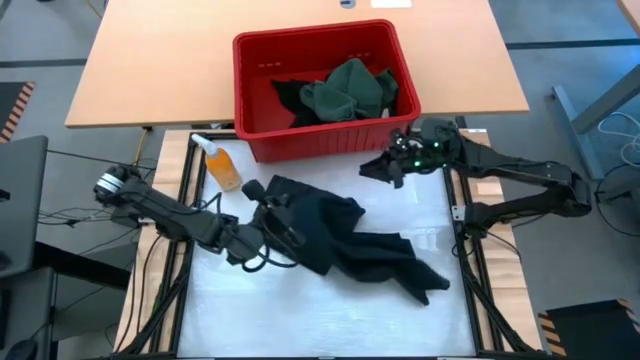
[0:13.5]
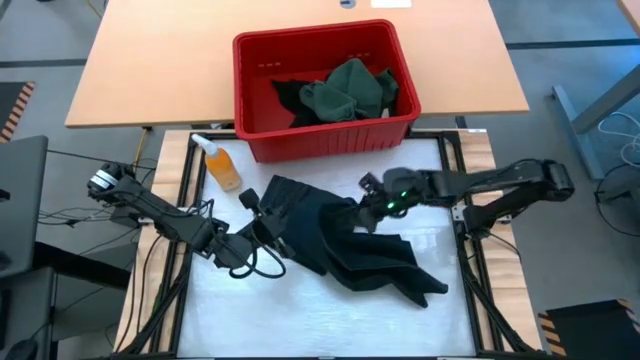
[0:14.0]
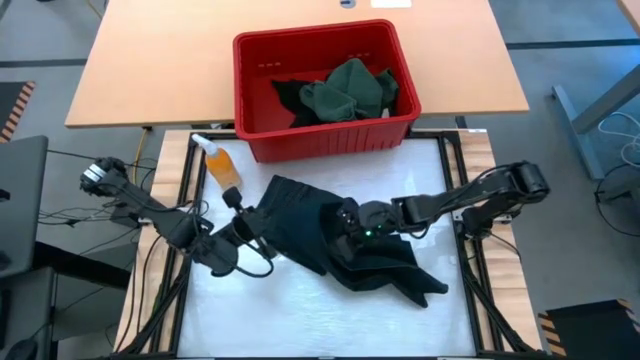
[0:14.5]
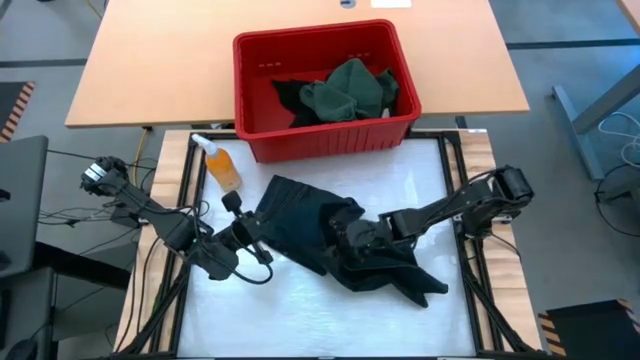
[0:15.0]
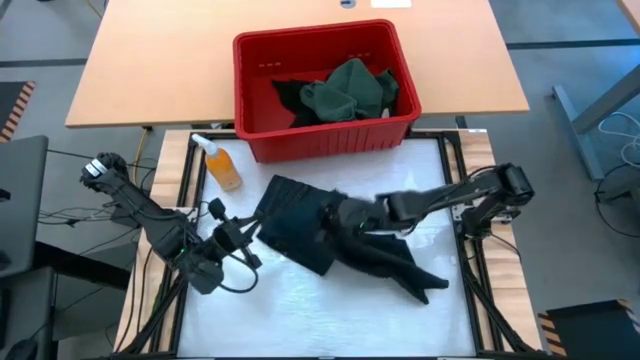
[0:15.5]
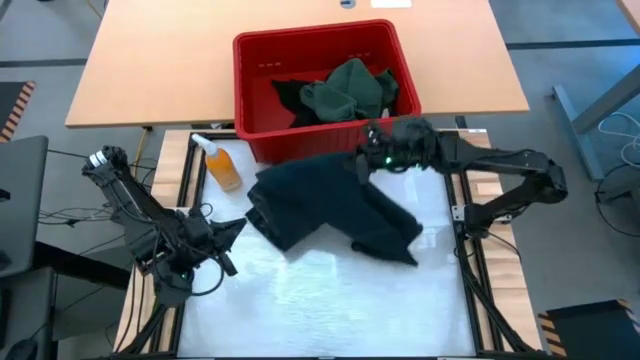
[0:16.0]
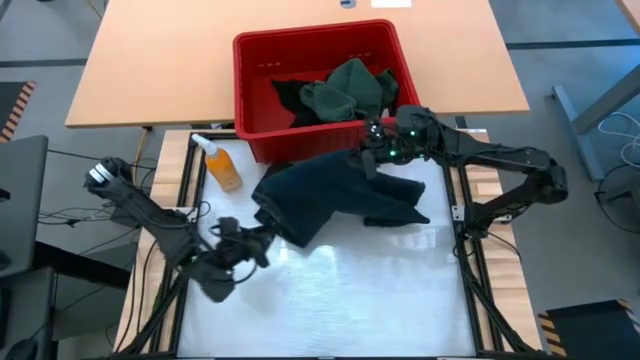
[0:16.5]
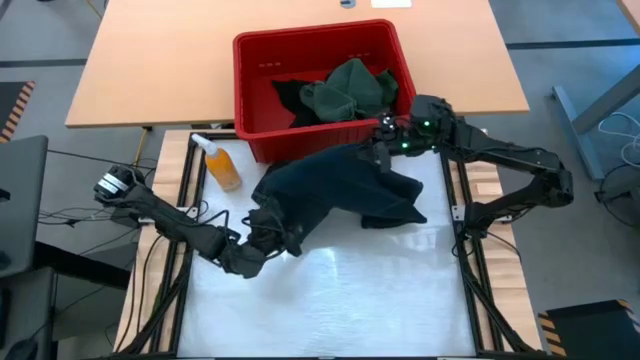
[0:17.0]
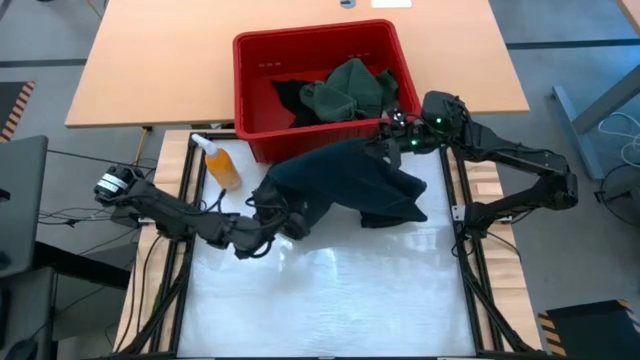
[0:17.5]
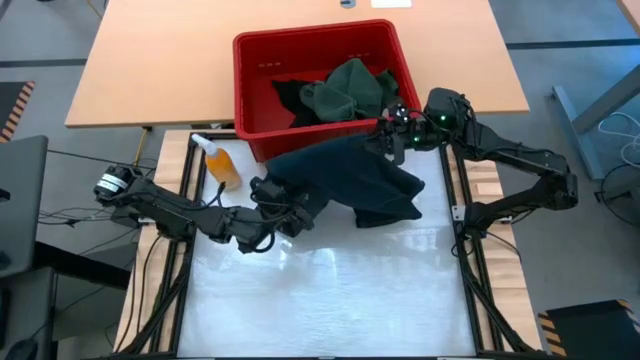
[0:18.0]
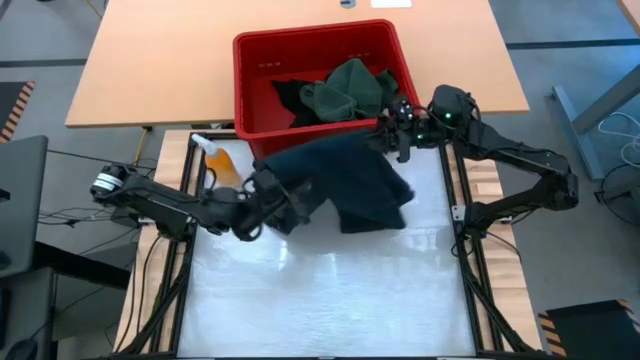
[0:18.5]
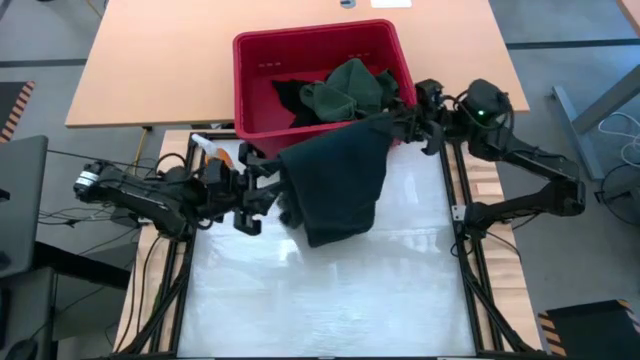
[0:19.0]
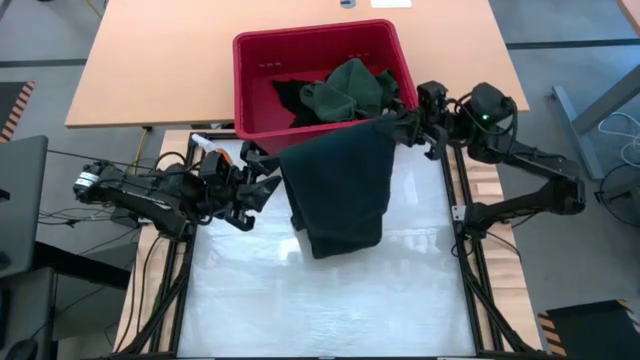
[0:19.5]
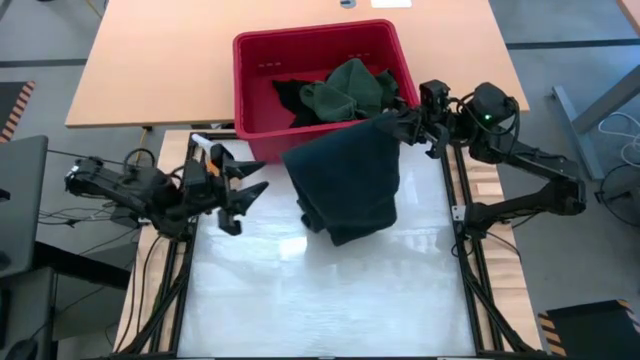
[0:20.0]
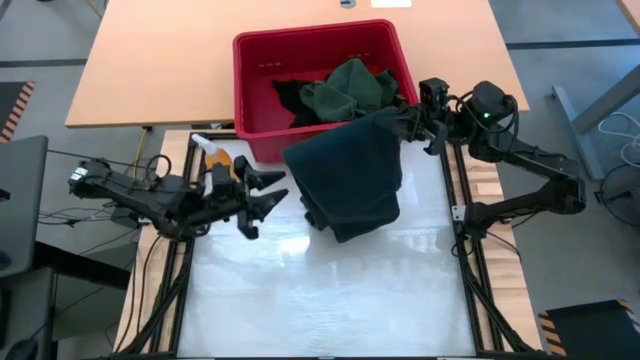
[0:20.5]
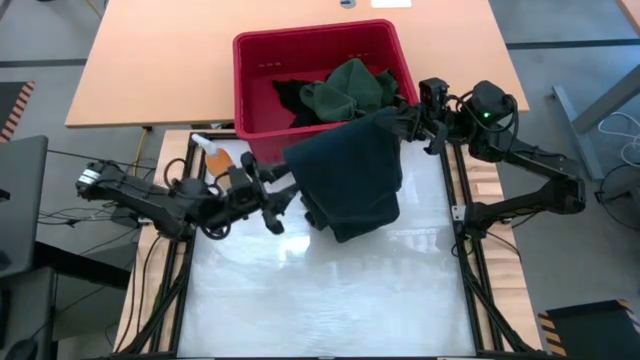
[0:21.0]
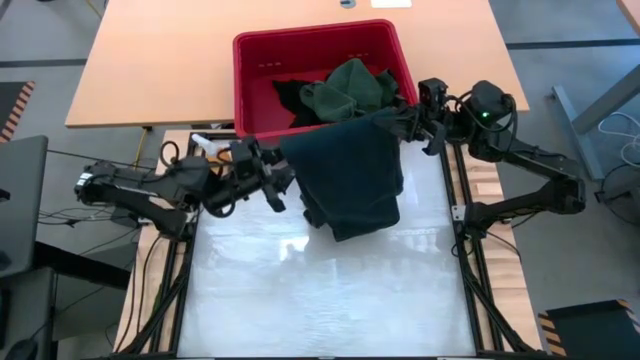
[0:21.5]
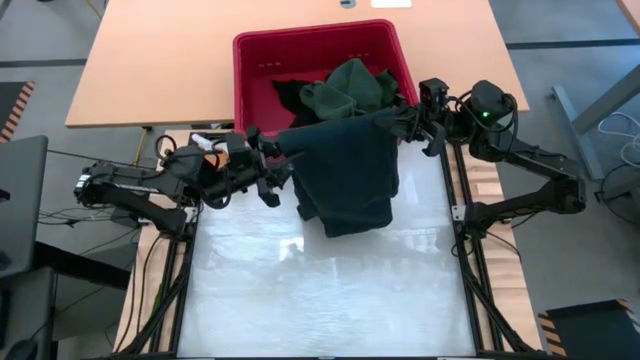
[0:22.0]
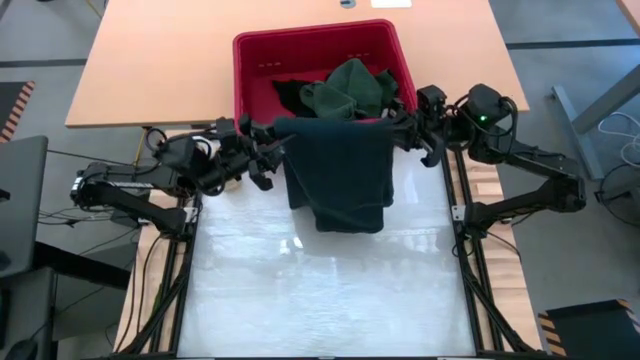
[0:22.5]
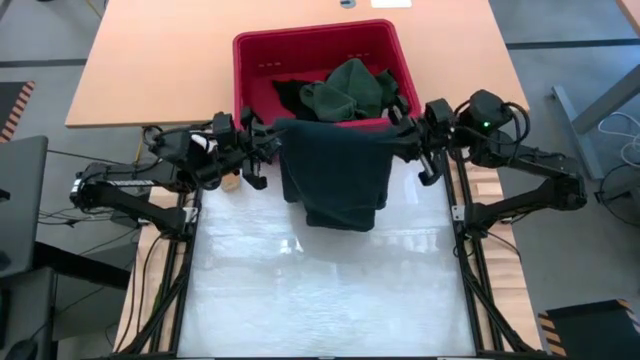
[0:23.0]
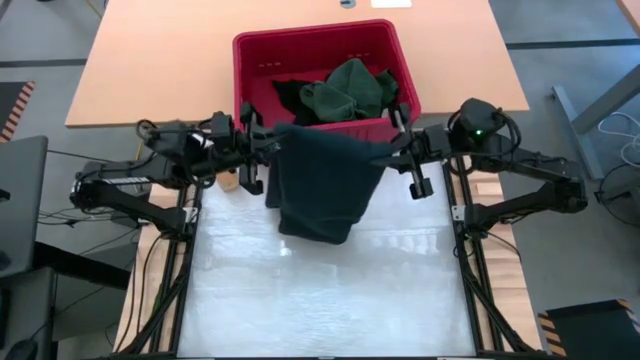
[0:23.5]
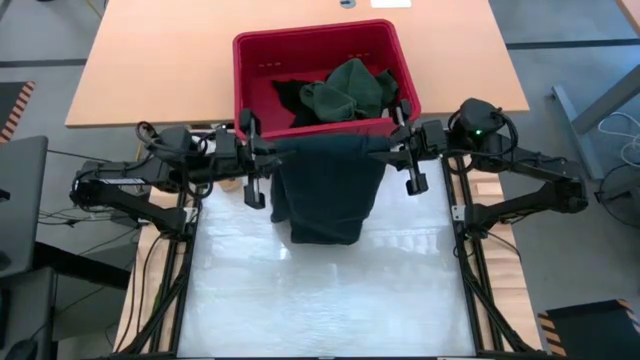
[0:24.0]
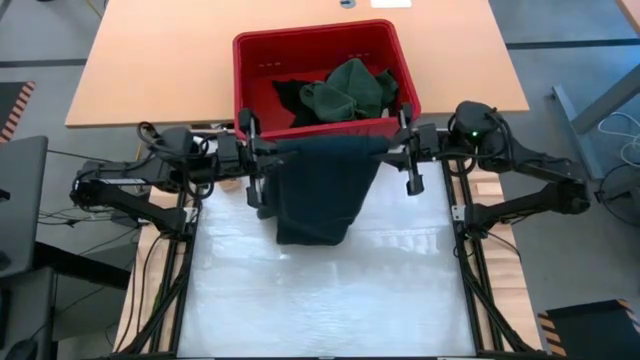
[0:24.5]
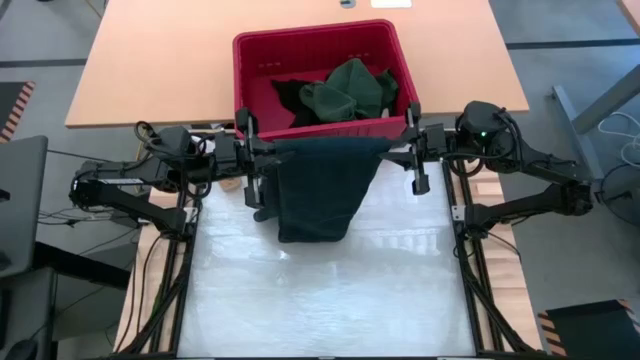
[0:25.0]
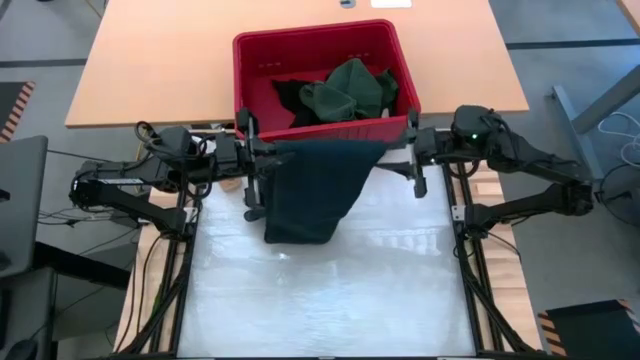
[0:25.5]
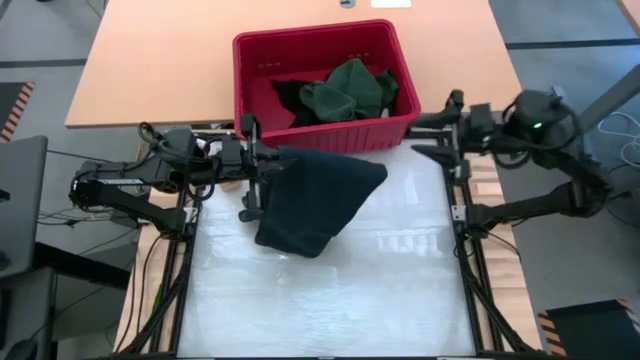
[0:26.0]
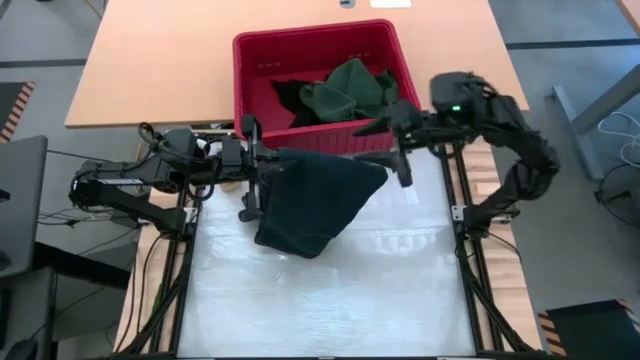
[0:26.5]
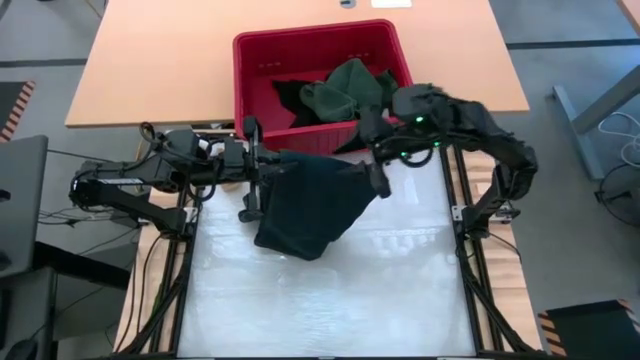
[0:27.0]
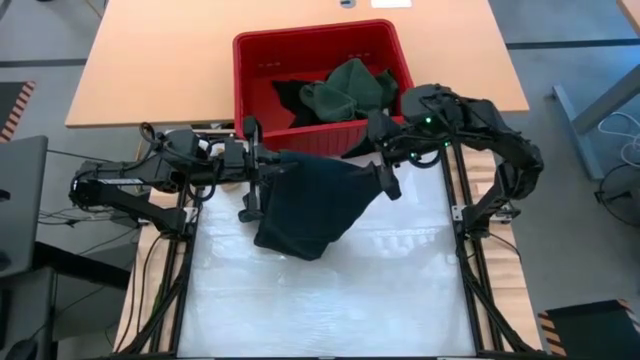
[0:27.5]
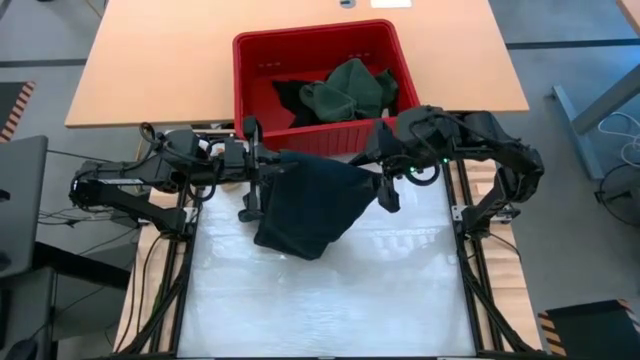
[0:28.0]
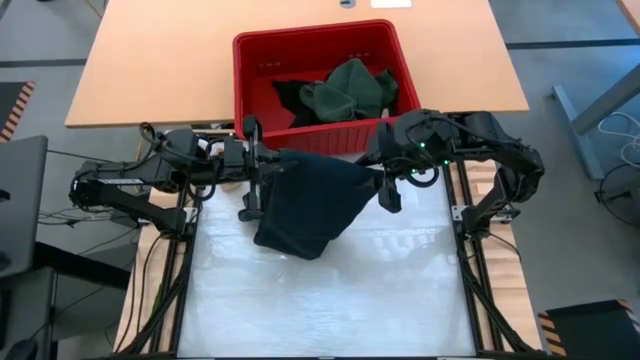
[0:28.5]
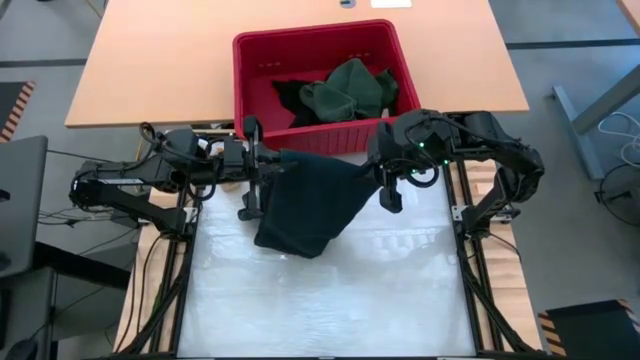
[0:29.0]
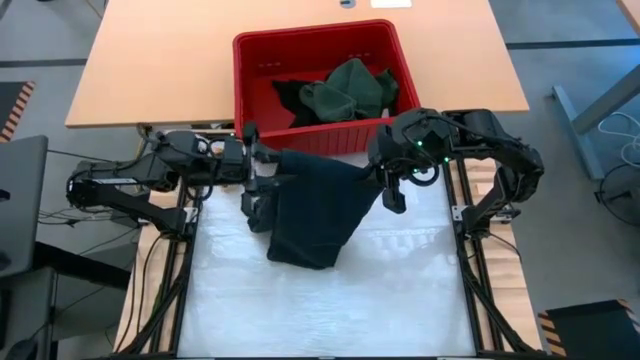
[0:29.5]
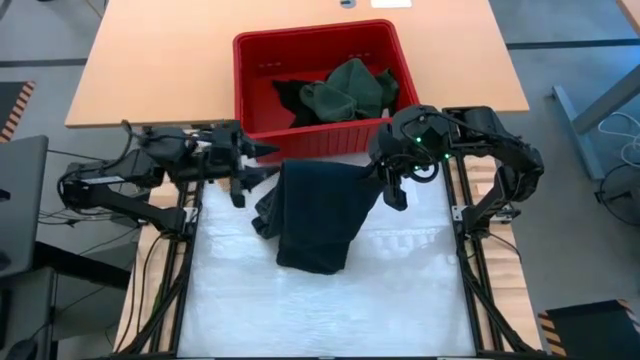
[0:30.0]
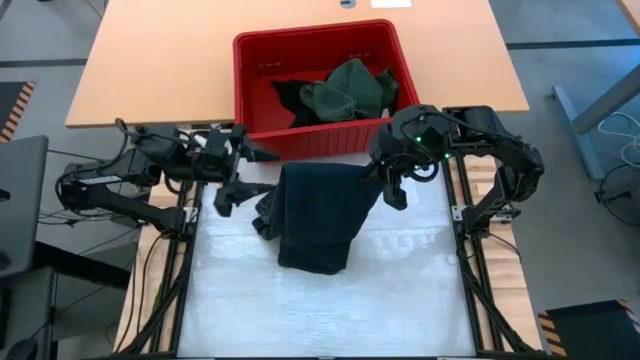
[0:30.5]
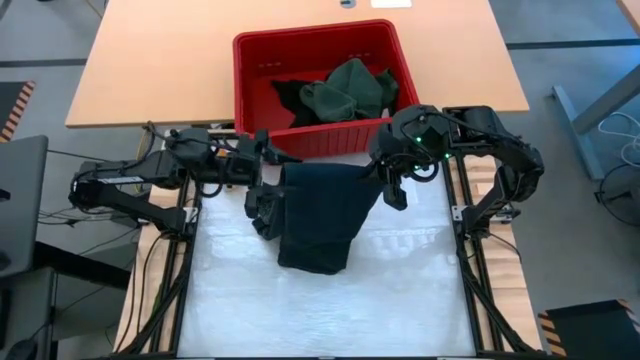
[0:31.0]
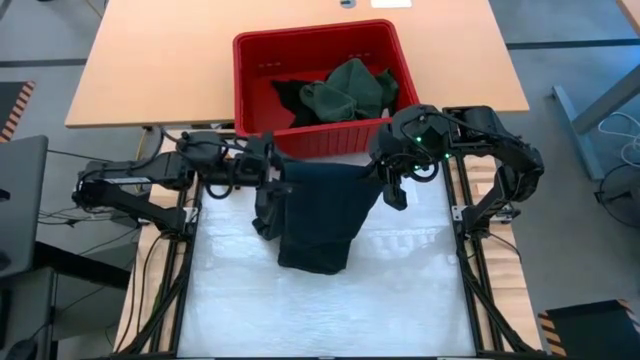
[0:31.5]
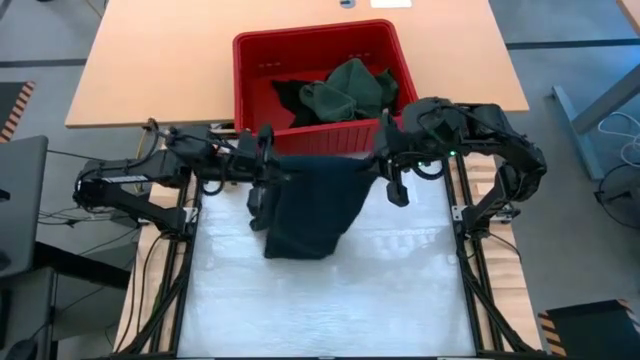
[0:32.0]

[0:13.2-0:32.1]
Task: Fold laundry
Fold the dark blue pants
